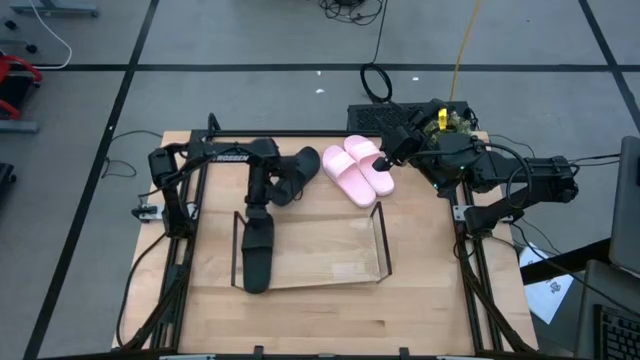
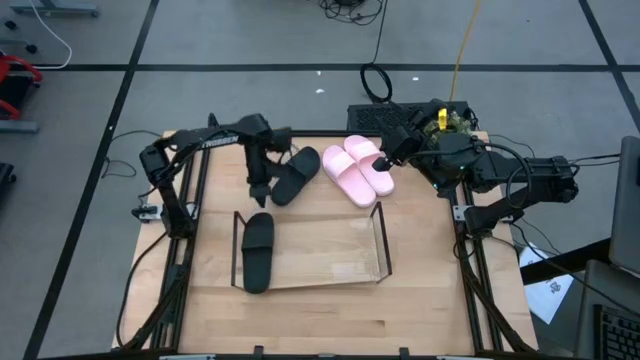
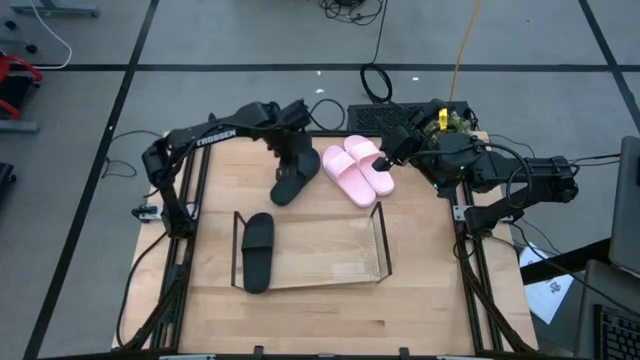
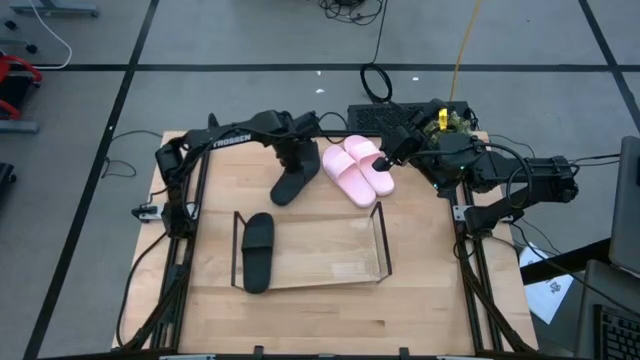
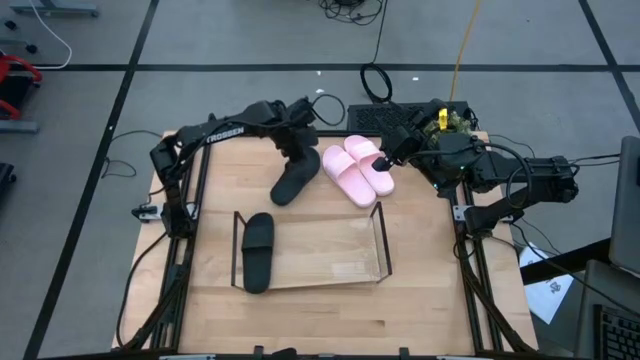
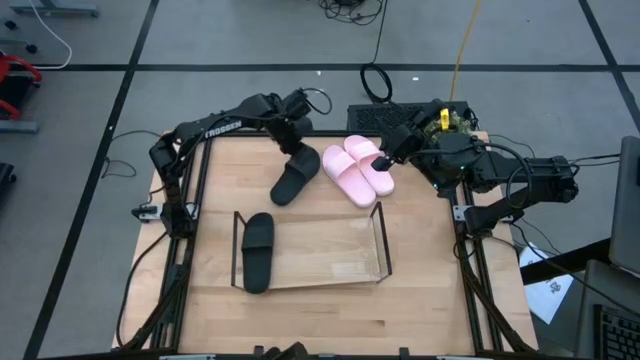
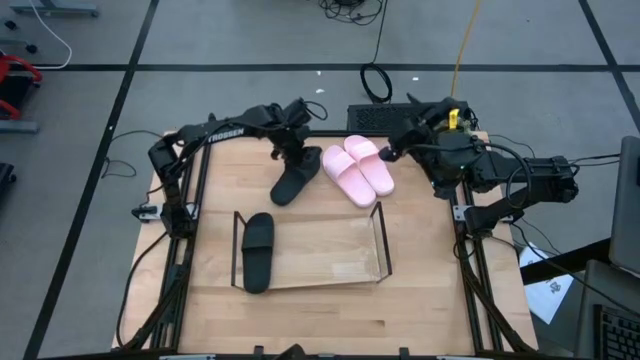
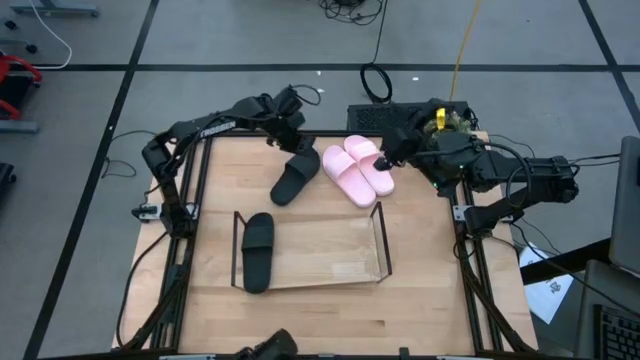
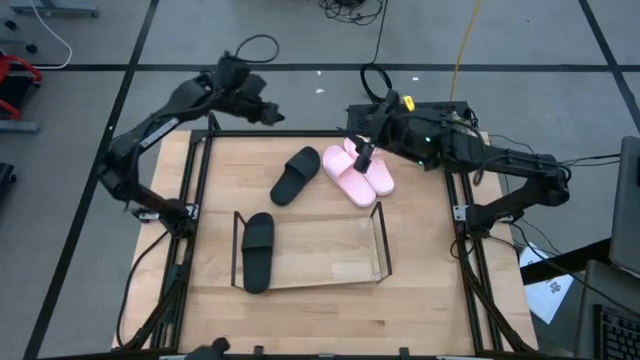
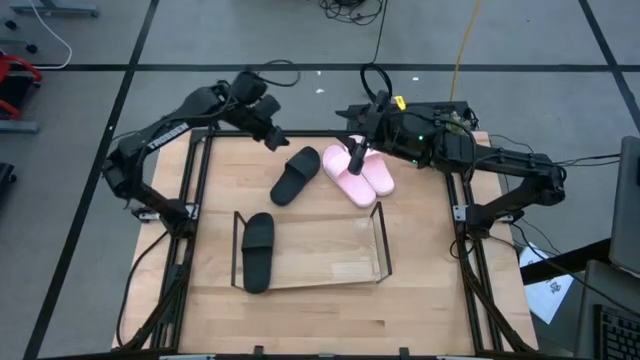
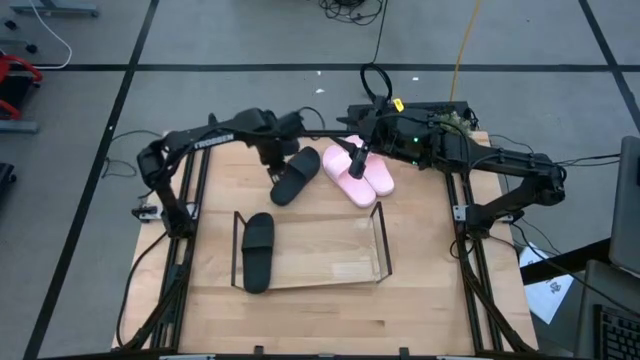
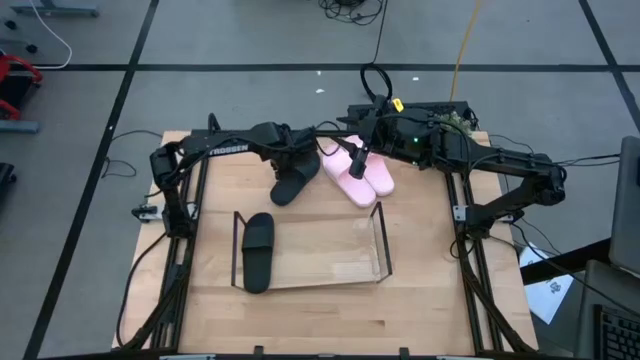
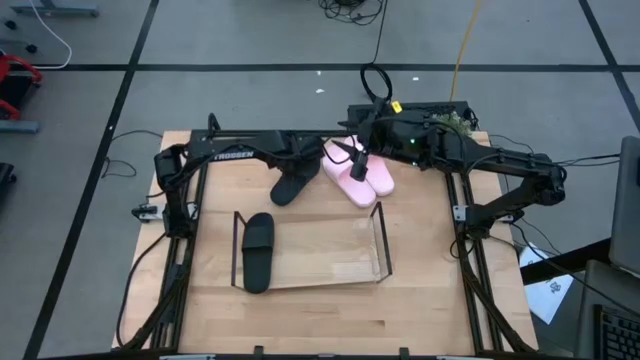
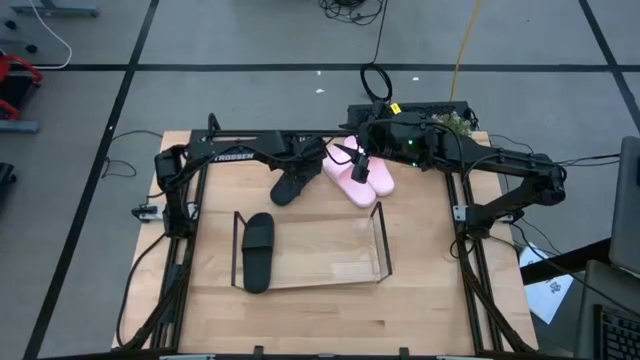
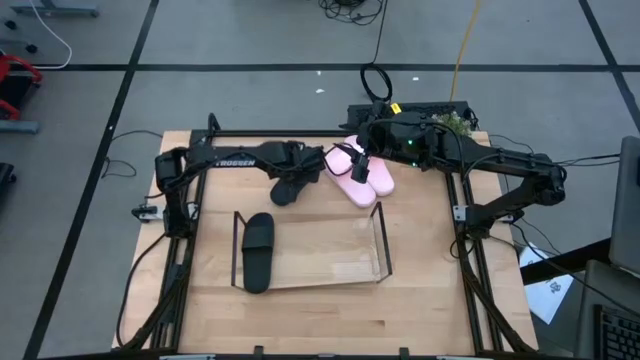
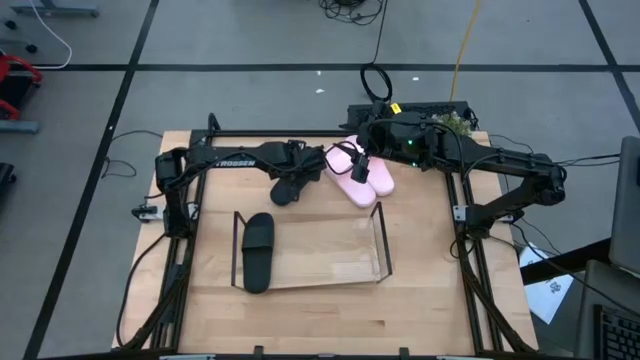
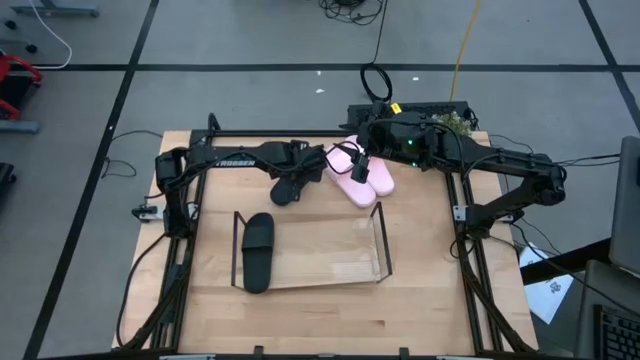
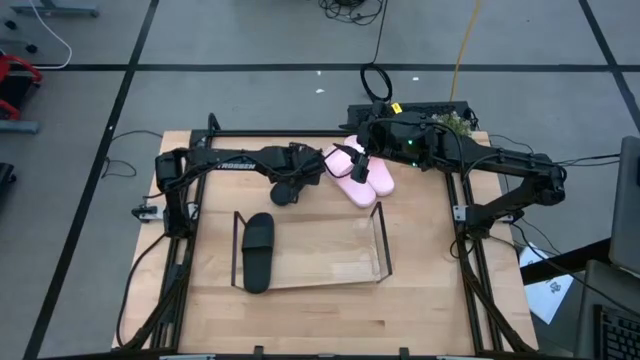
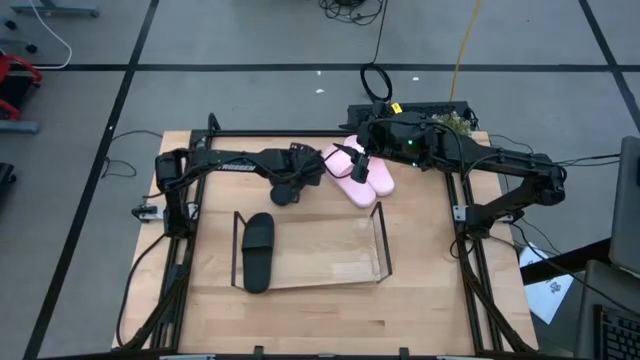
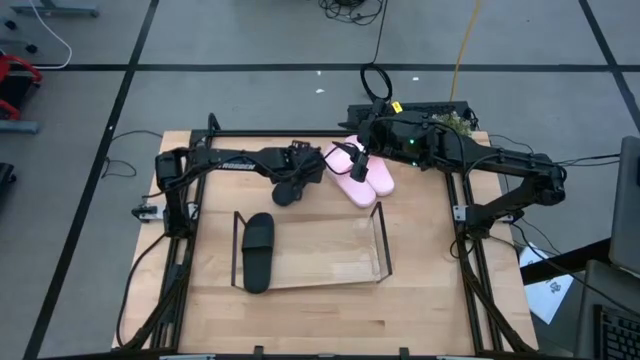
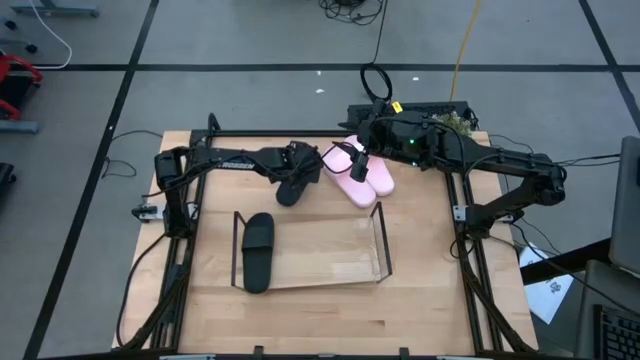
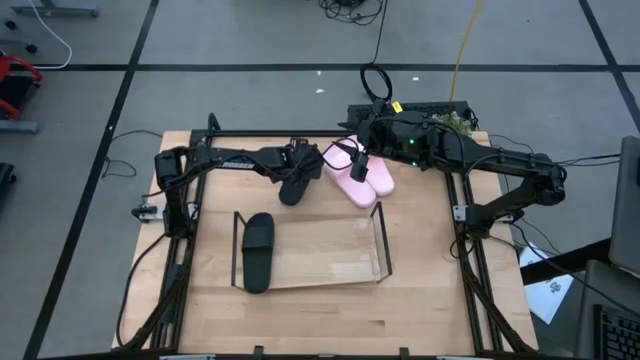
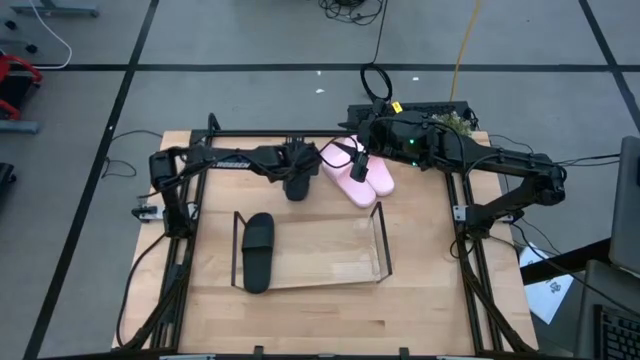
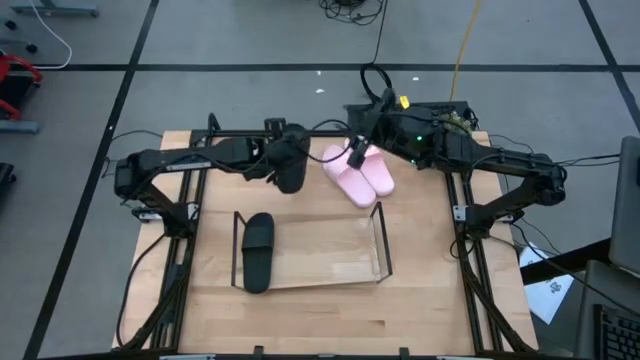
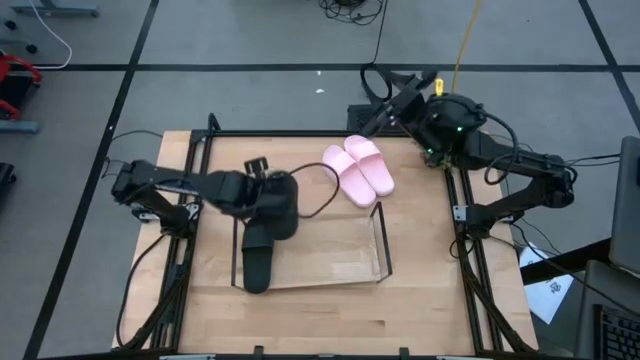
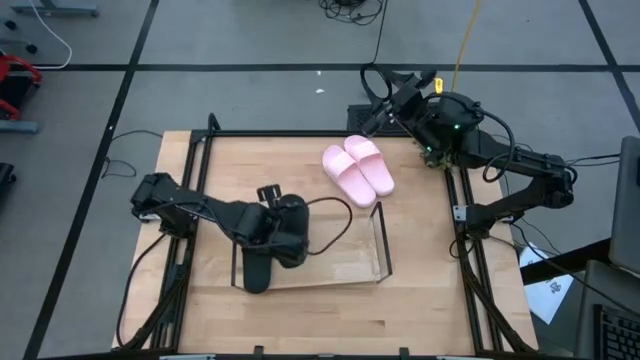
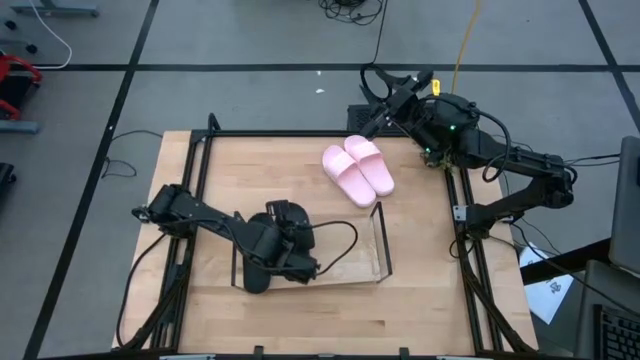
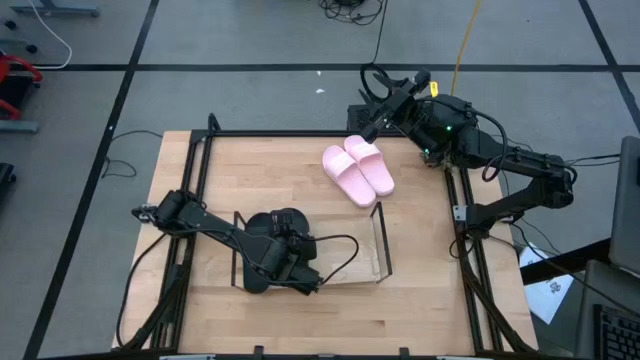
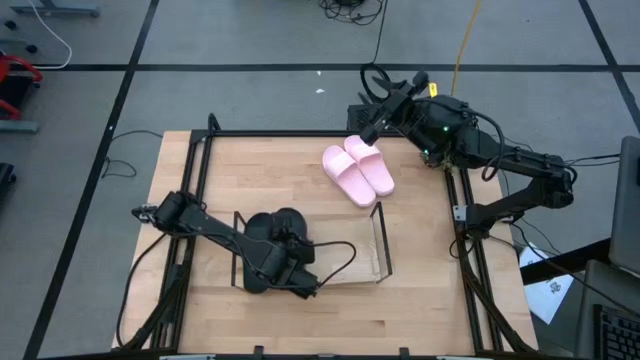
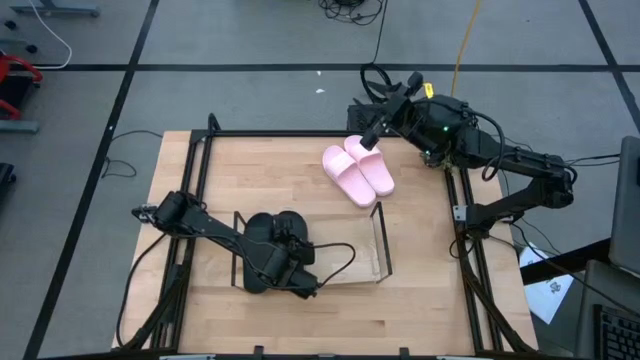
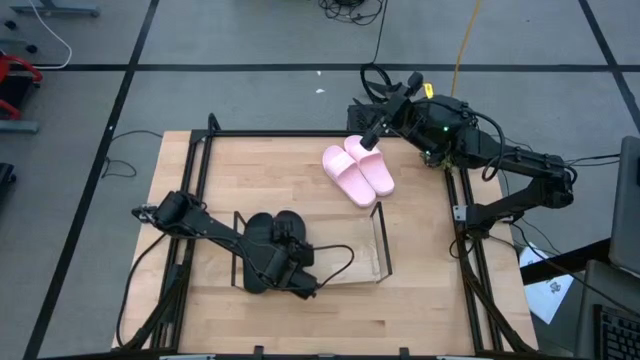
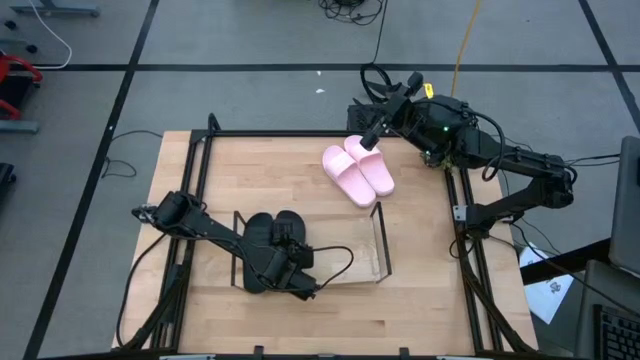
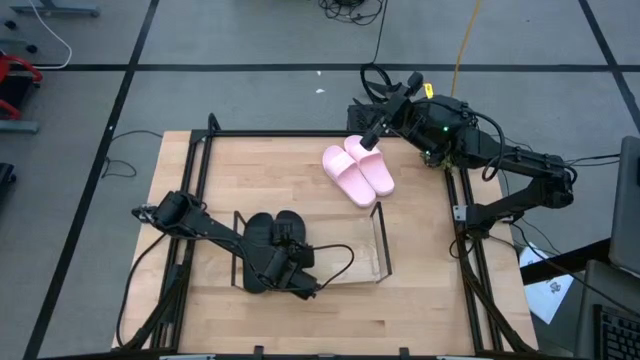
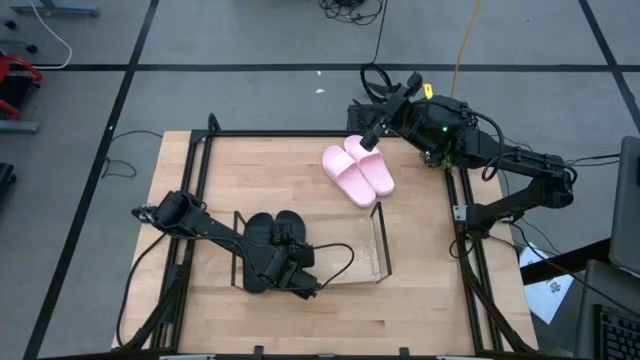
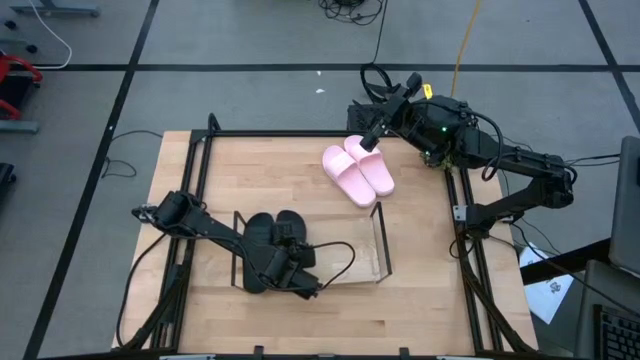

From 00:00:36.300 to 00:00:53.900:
Task: Pick and place slides into the shelf
Put the black slides on the shelf
